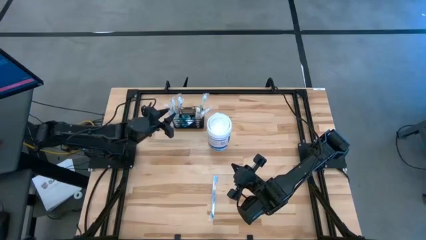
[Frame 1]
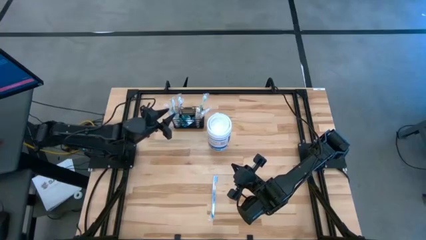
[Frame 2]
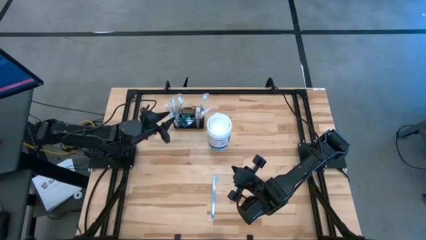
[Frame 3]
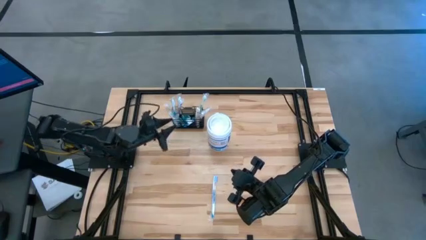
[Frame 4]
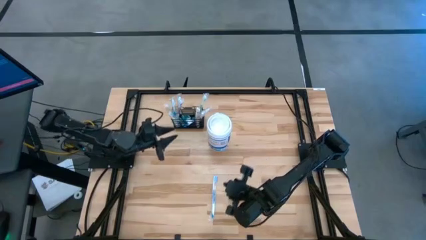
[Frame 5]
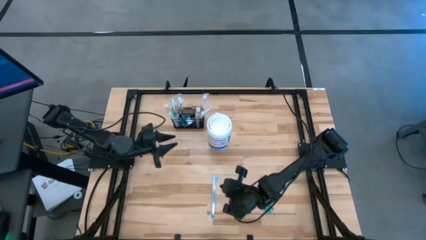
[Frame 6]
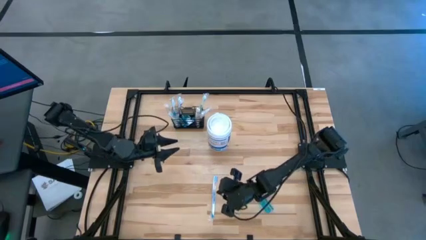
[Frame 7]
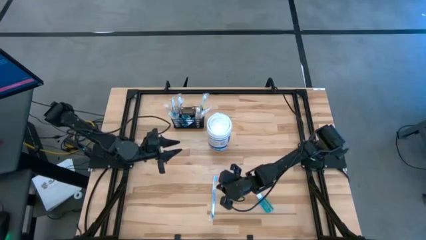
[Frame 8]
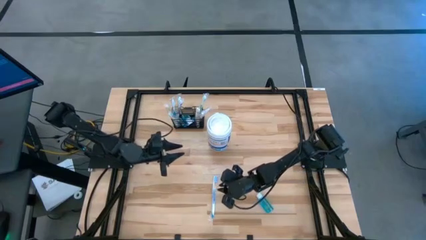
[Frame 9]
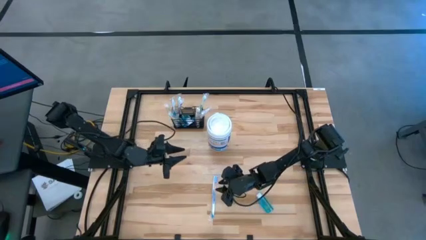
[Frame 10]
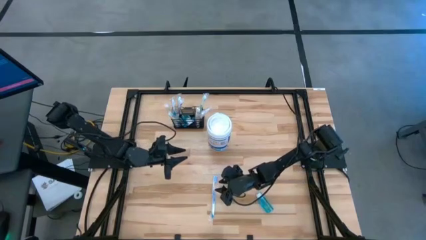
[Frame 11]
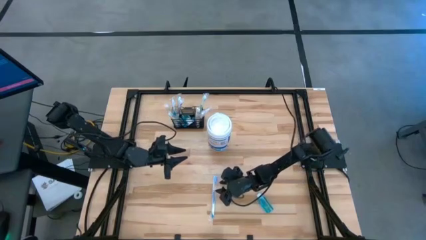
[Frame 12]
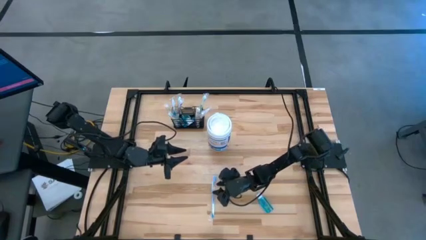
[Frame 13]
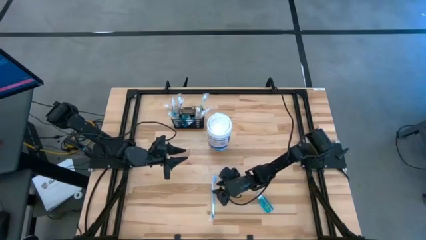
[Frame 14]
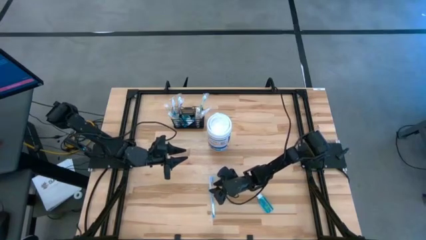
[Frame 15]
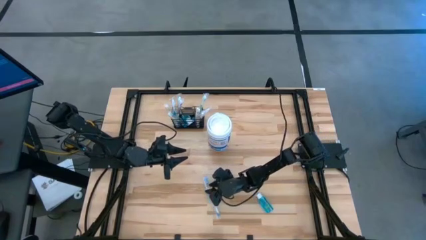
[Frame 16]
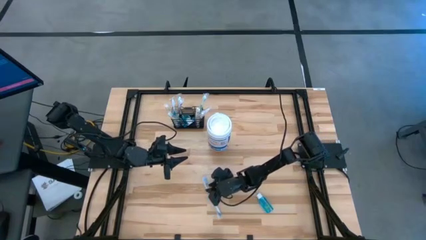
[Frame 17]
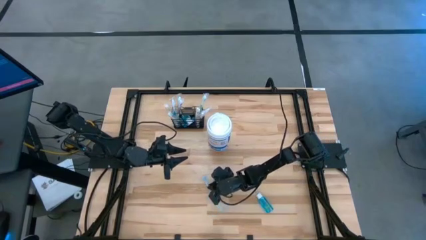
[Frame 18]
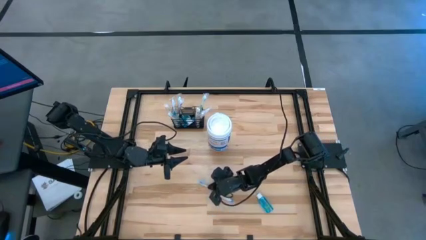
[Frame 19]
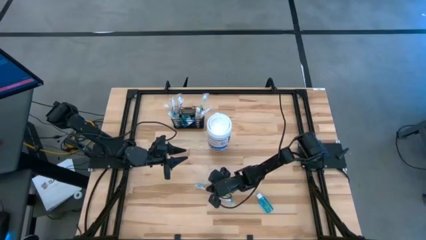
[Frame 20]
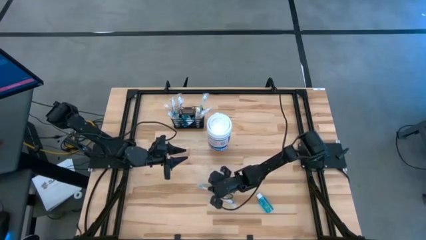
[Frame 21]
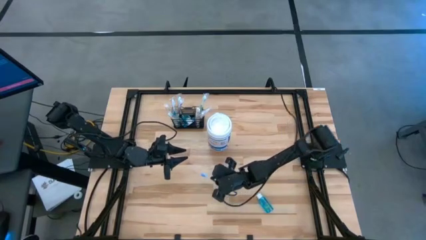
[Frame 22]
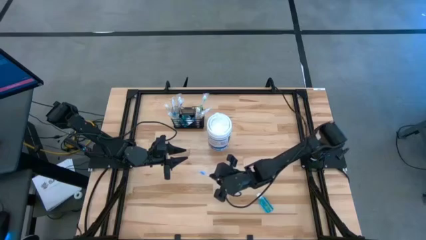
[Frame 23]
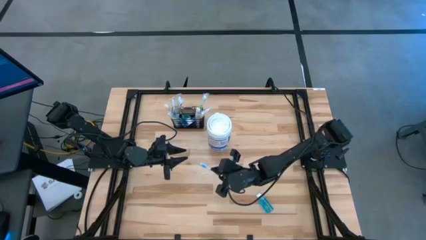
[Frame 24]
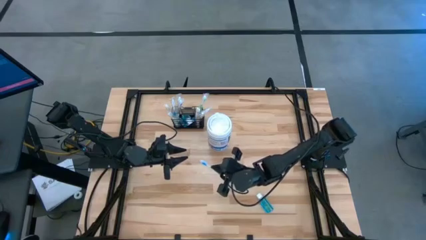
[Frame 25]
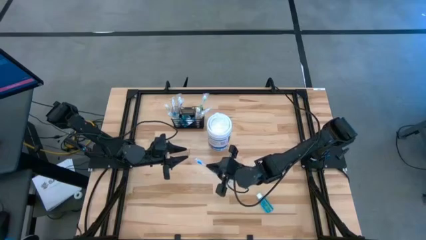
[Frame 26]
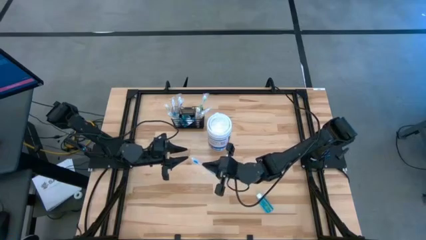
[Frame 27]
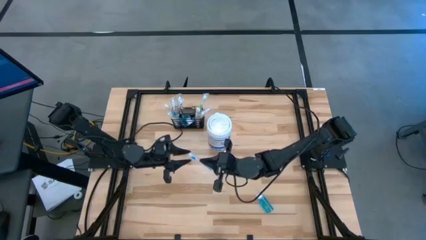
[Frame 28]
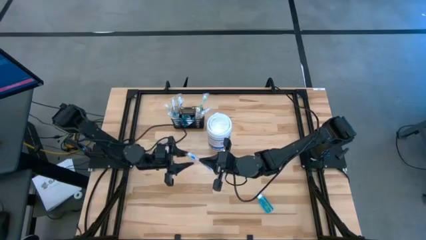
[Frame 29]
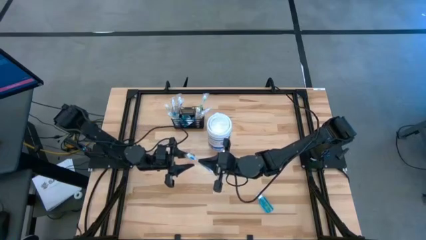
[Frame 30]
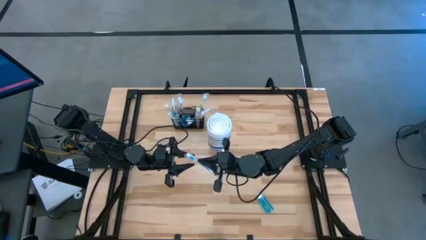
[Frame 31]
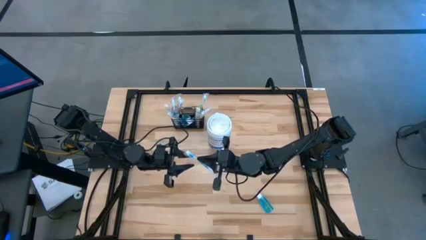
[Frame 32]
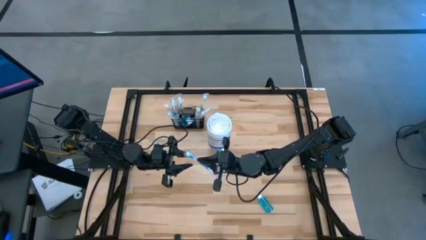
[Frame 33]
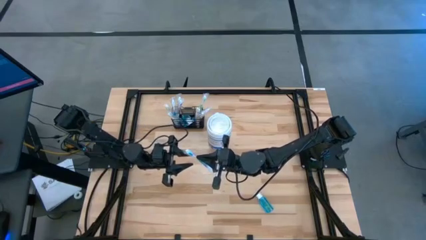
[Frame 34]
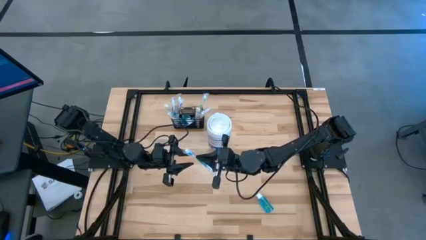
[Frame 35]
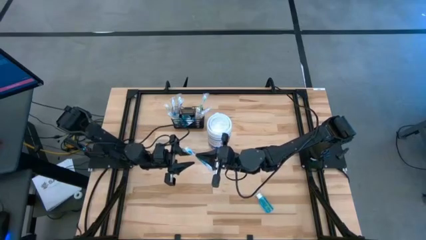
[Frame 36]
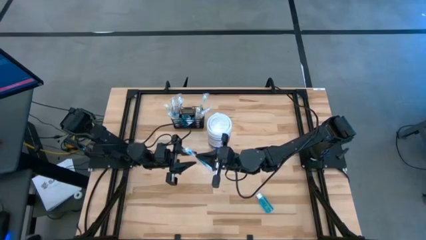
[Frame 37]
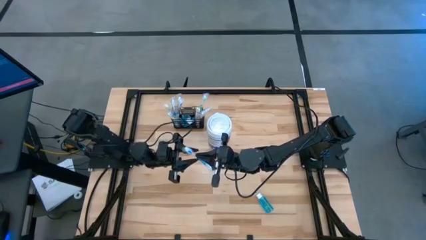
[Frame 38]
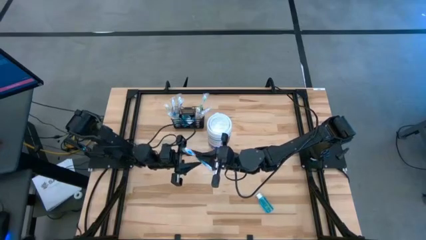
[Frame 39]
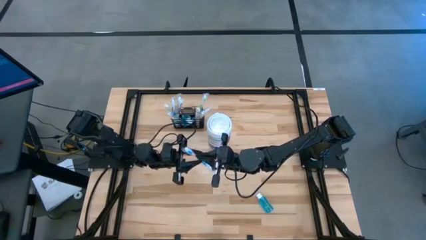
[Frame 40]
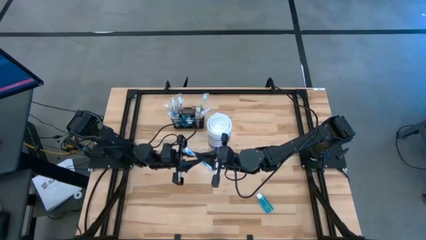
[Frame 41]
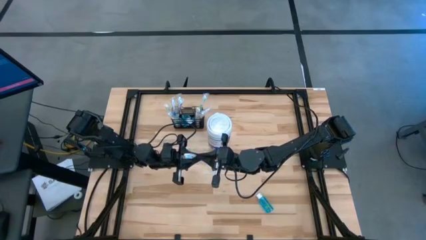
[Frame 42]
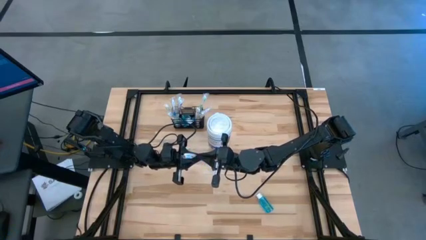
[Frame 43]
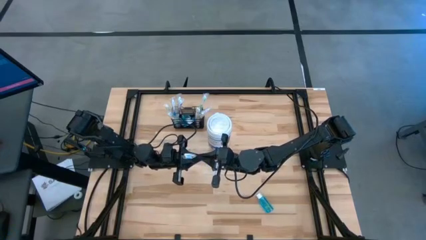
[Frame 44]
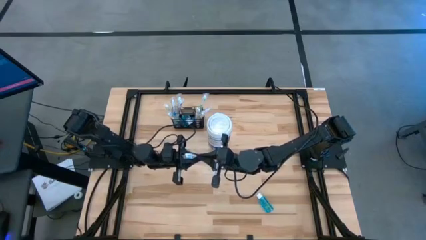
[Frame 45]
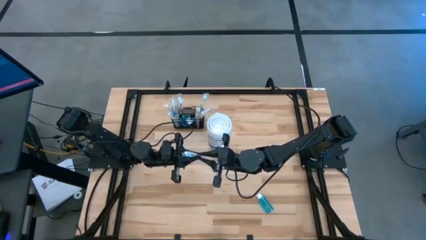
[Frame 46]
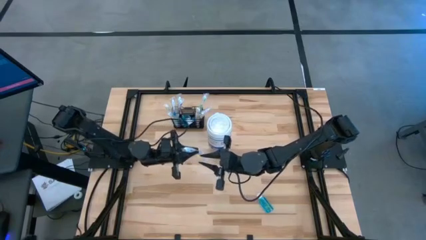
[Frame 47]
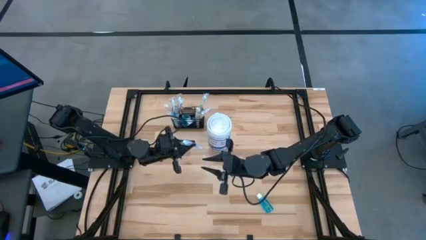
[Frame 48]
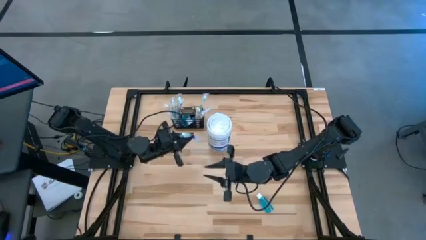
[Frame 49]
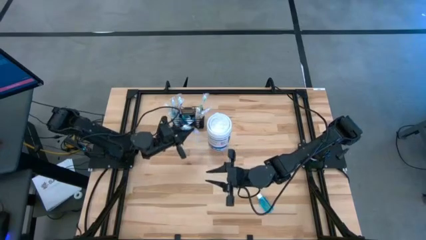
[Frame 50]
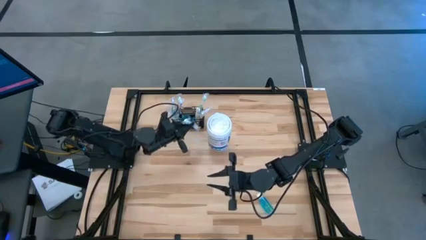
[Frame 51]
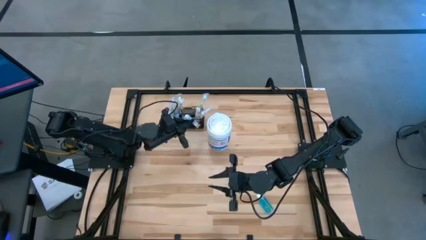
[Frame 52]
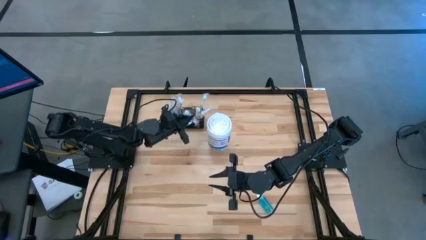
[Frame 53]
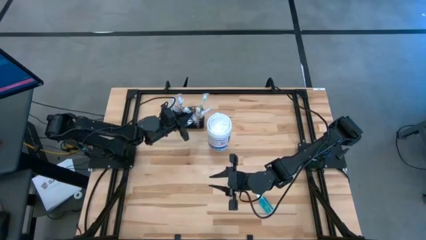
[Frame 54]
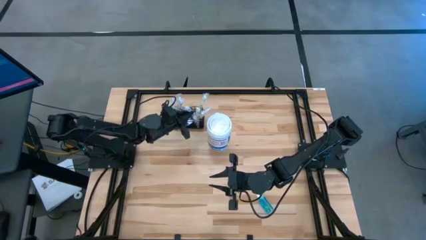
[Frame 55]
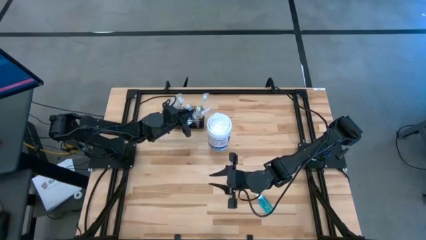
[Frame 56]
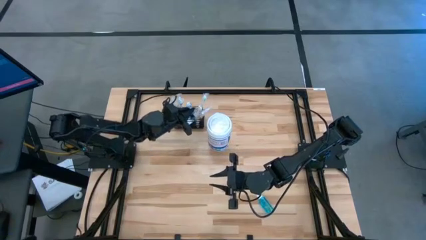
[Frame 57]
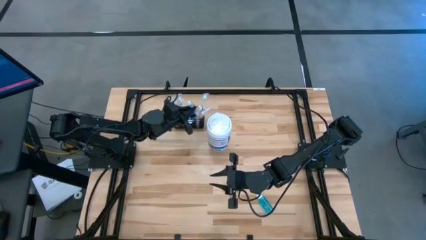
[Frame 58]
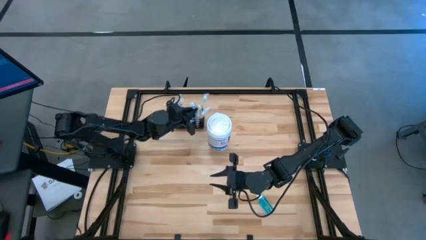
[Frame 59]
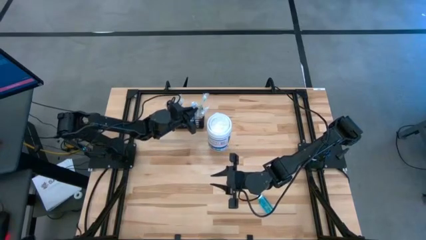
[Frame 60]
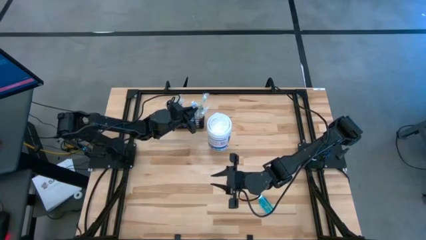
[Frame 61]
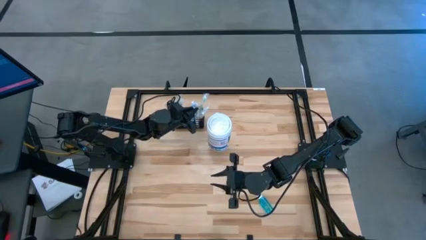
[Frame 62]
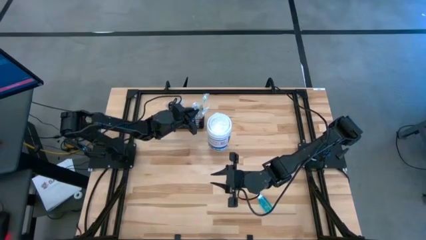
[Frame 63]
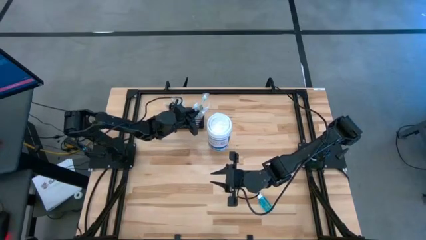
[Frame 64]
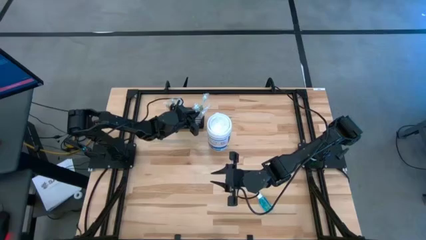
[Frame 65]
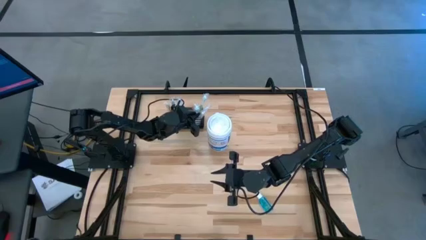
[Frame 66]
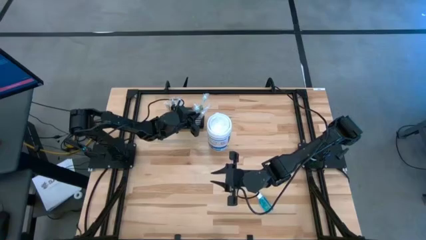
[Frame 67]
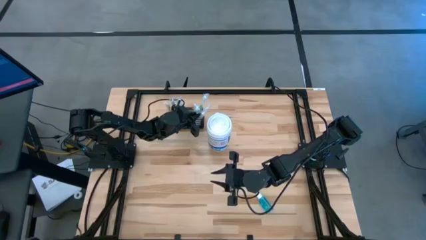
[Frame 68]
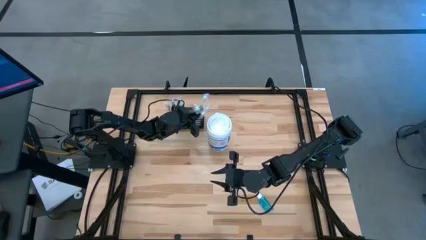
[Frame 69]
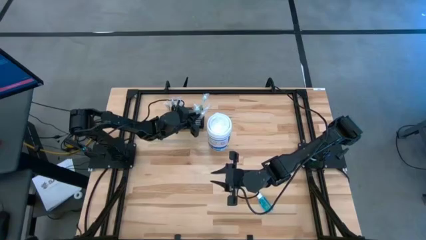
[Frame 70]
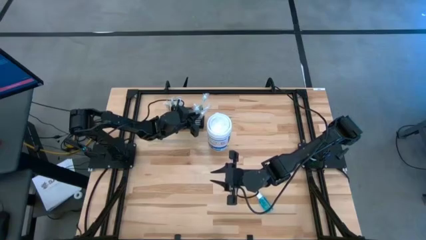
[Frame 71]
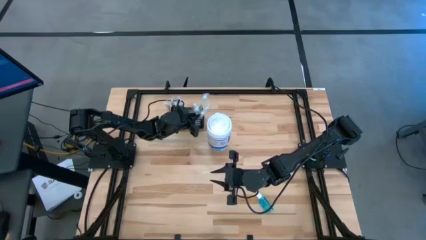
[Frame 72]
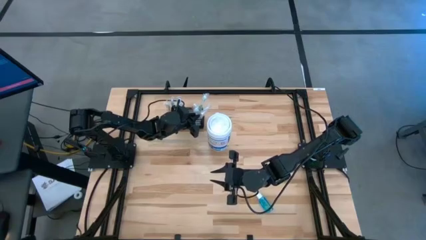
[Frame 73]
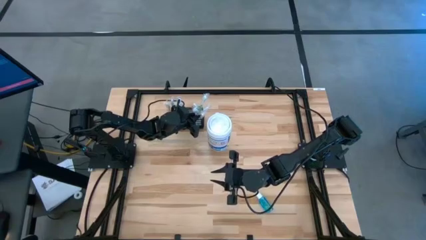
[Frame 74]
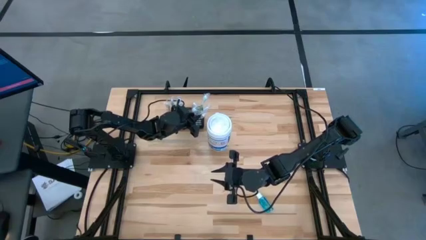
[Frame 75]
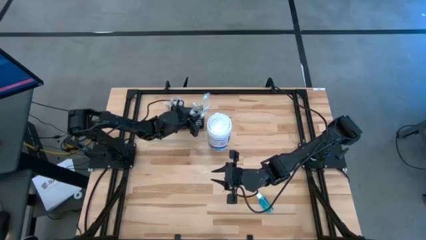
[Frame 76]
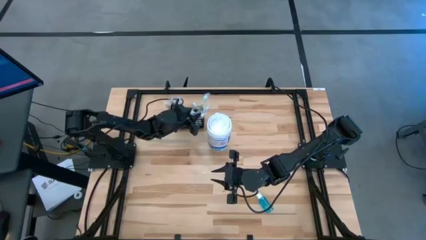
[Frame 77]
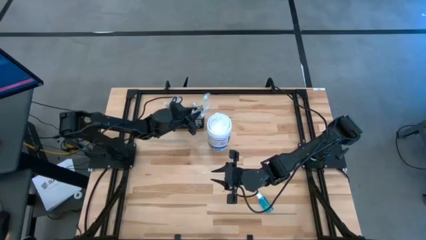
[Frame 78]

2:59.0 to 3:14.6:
Task: Pick & Place toothbrushing station
Put the blue toothbrush into the mesh organizer

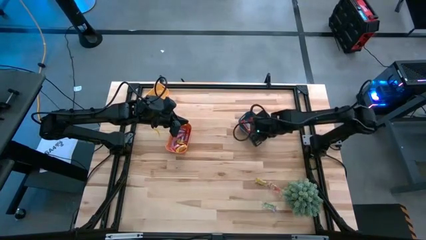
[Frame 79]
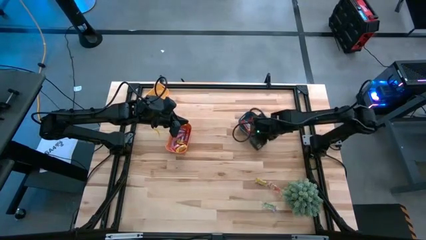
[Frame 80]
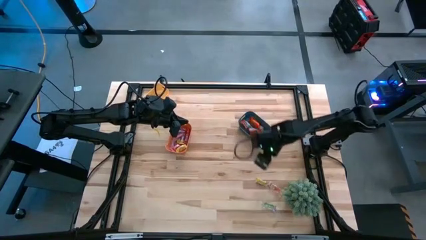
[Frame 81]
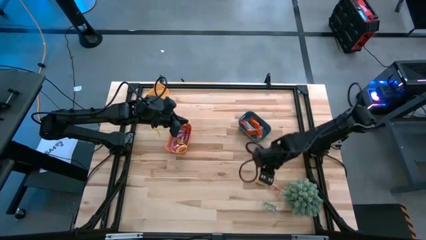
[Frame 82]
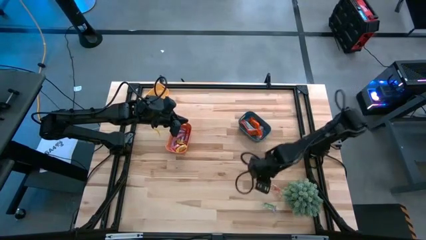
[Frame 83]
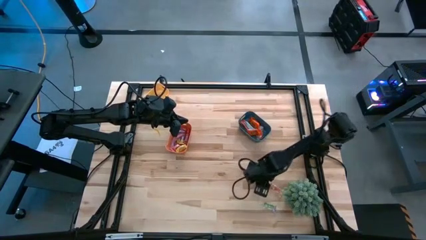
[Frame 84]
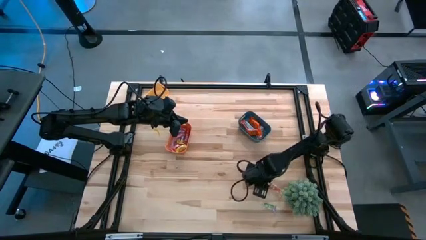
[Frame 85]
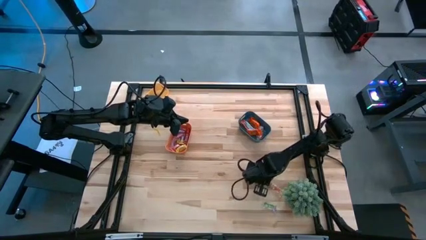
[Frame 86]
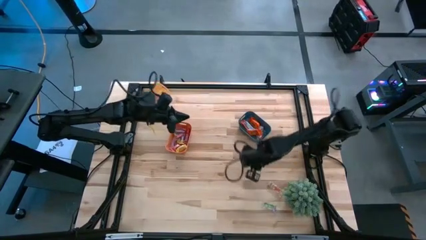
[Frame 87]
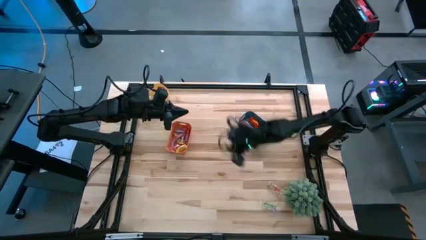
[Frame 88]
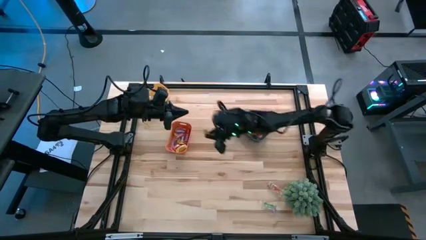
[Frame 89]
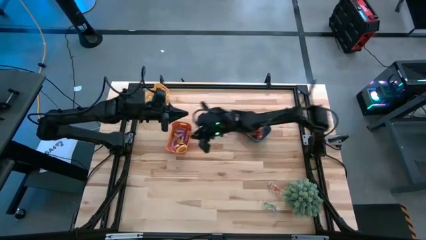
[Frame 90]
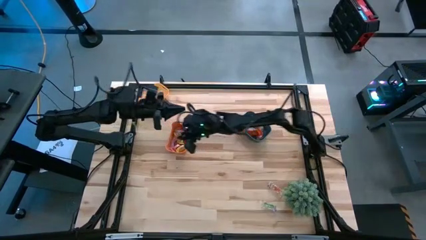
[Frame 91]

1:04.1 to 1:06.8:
Task: Sort candy
Put the yellow candy into the orange bin
